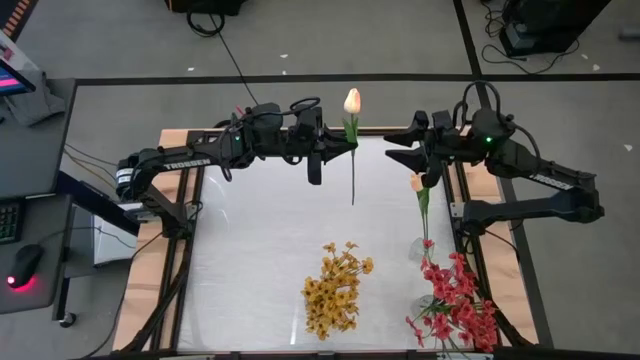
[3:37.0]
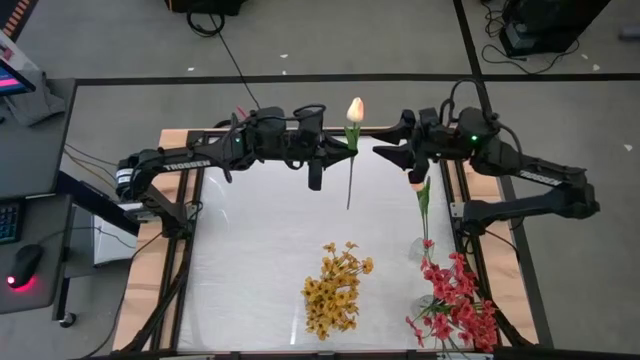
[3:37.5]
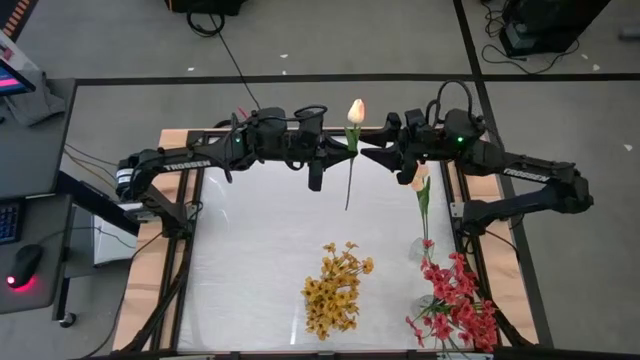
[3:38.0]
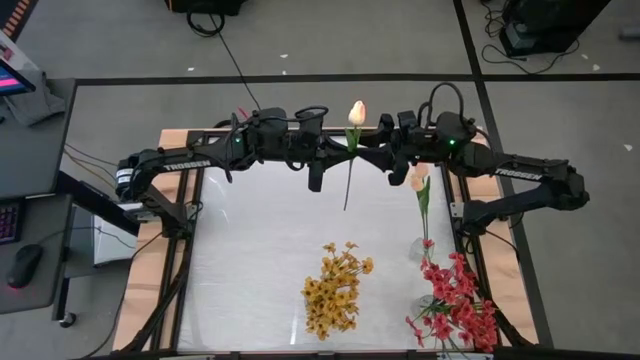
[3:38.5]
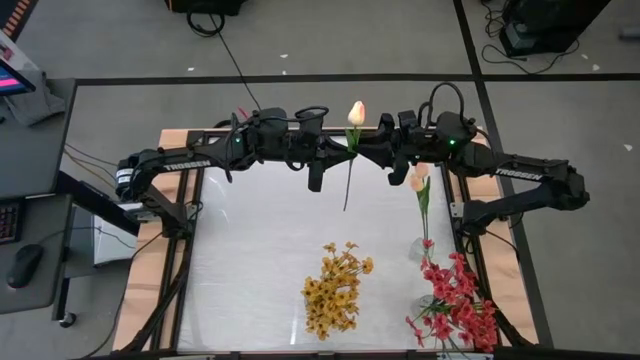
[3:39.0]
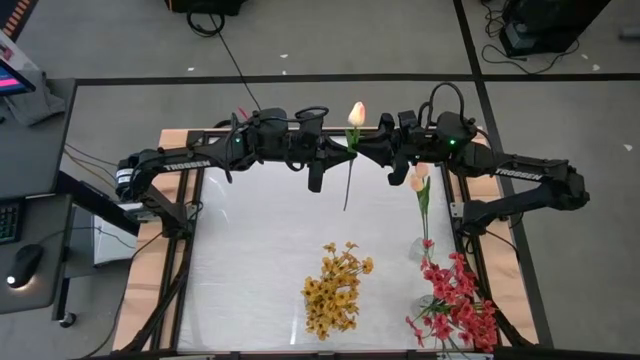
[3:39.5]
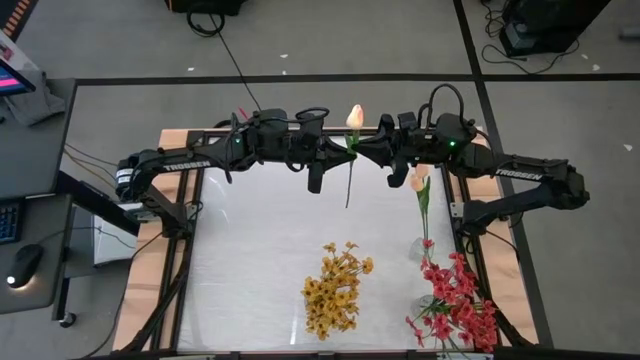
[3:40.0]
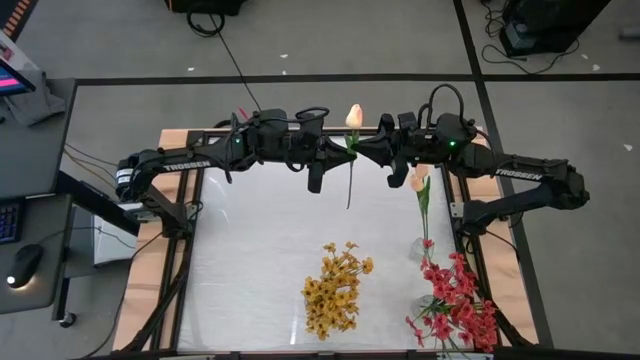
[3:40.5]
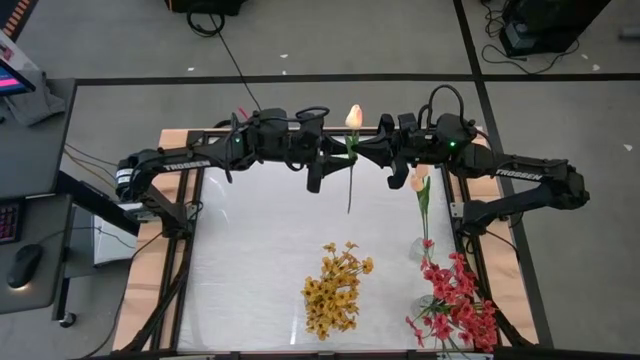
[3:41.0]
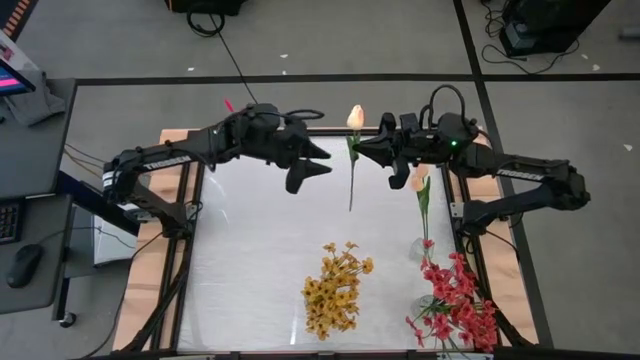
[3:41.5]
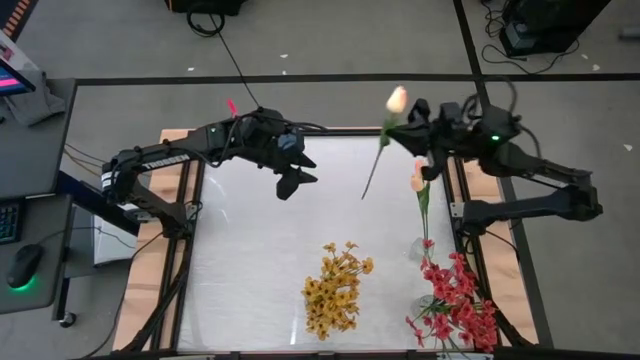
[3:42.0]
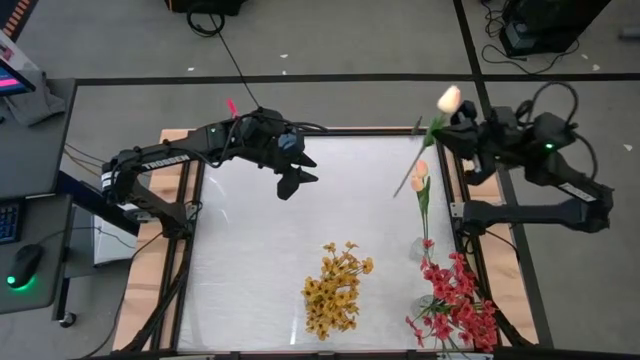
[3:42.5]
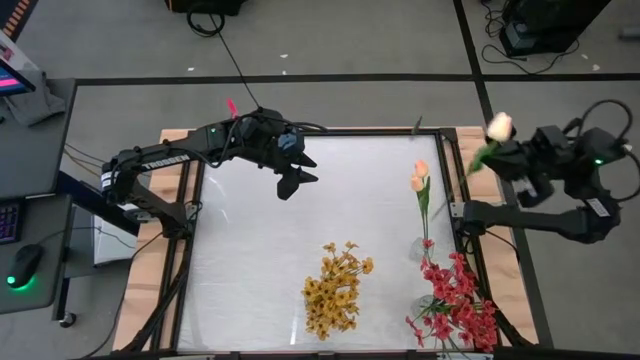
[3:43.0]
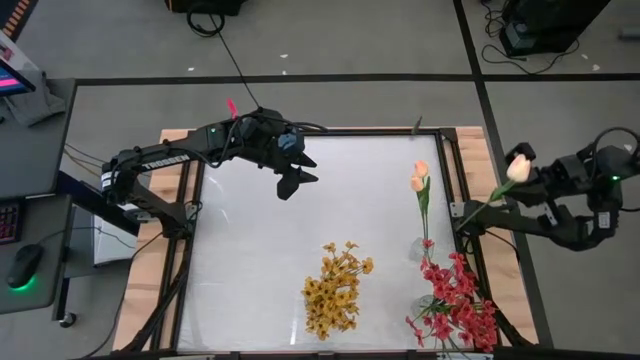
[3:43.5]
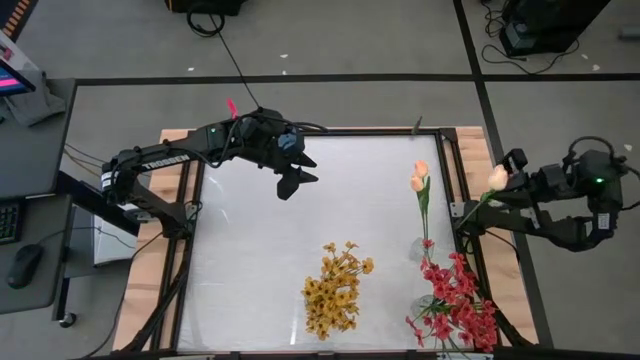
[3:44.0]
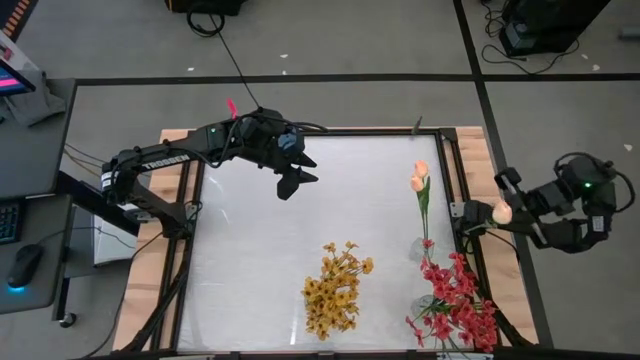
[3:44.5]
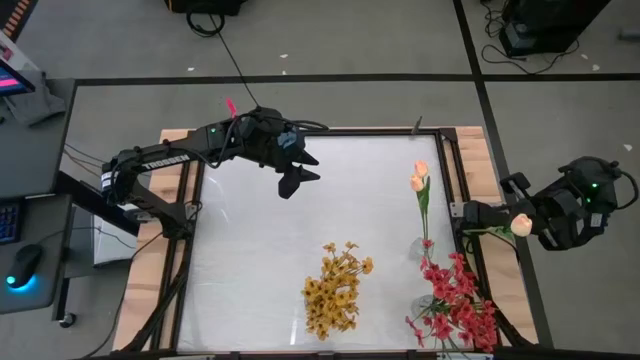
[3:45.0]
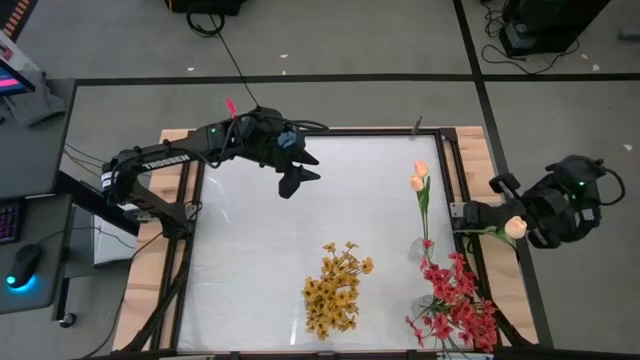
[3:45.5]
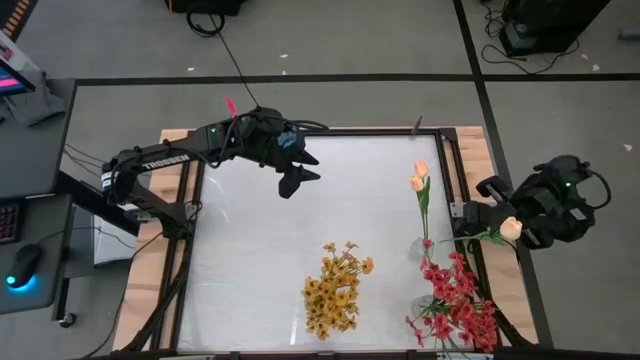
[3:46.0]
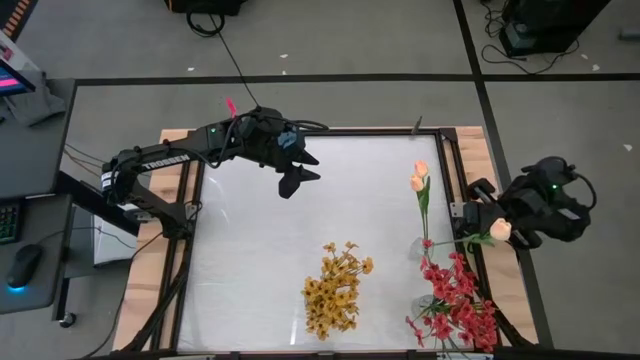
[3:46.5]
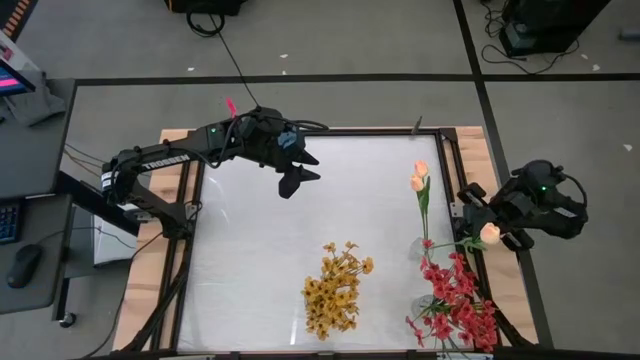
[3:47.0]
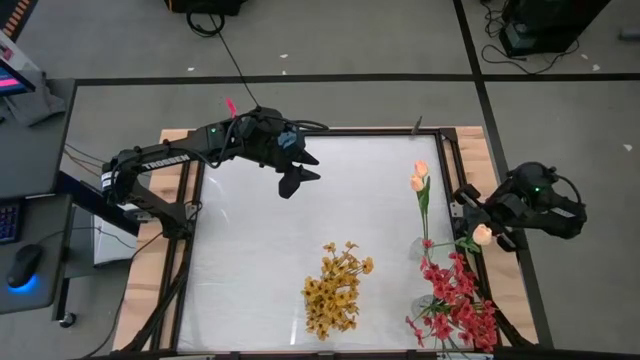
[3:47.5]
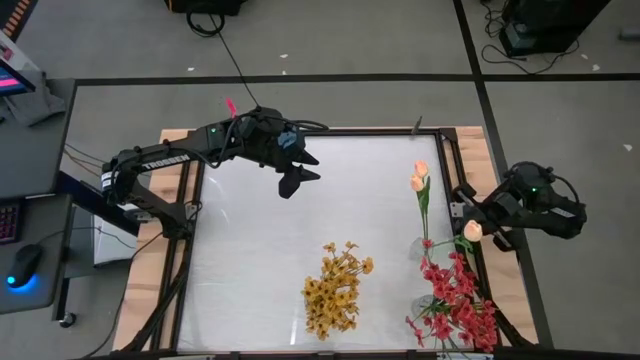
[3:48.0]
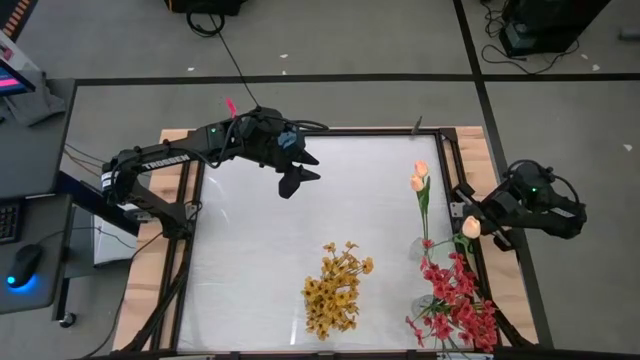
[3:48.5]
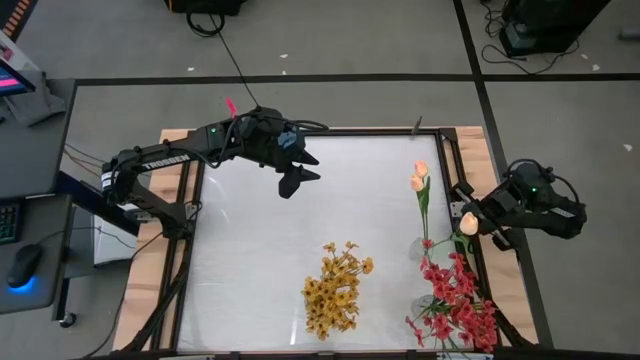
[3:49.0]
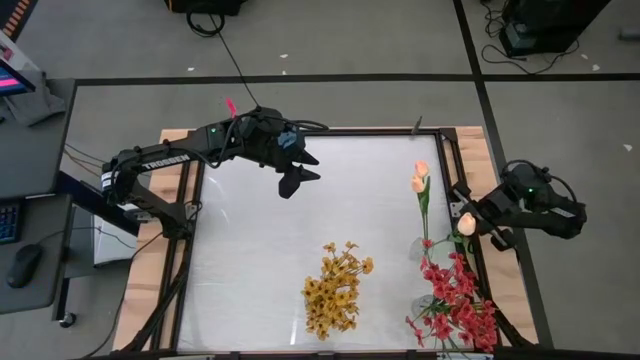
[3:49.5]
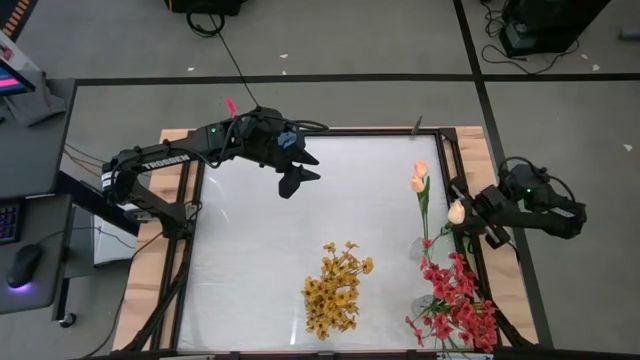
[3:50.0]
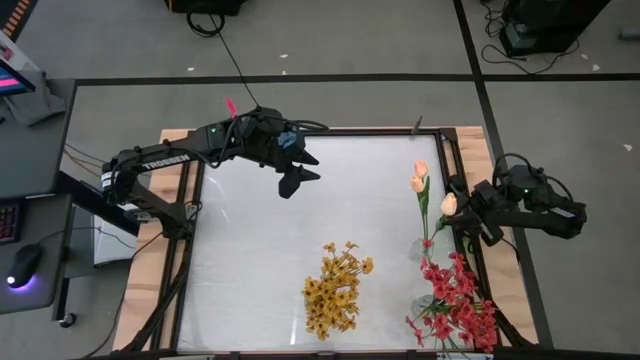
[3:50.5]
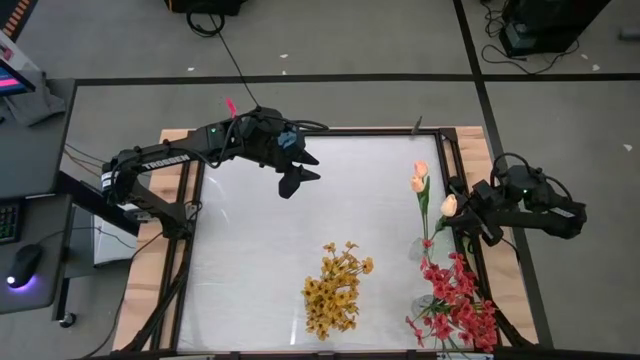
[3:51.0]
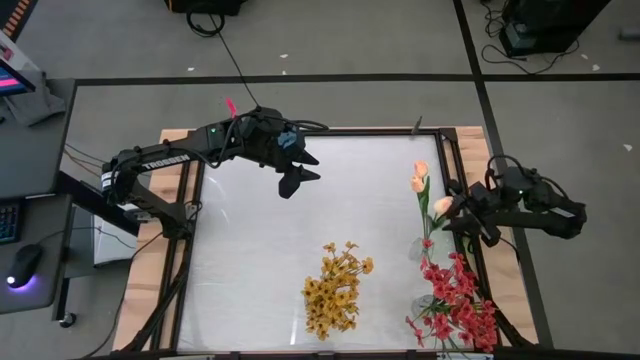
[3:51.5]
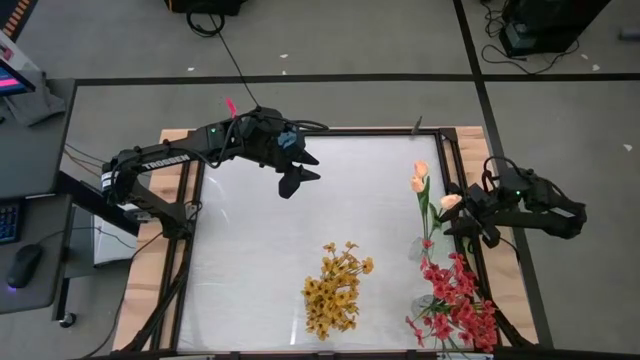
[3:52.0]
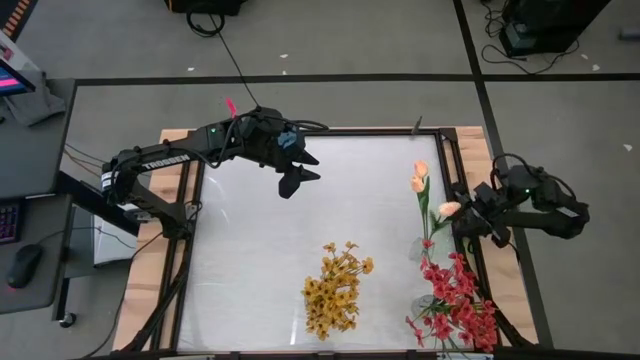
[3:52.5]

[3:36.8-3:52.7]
Task: Sort flowers into vase by color
Put the light pink flower into the top transparent vase

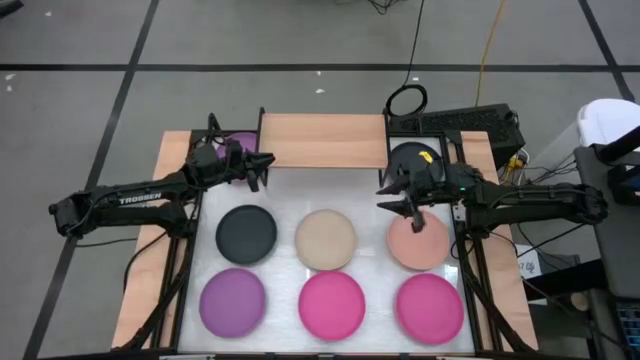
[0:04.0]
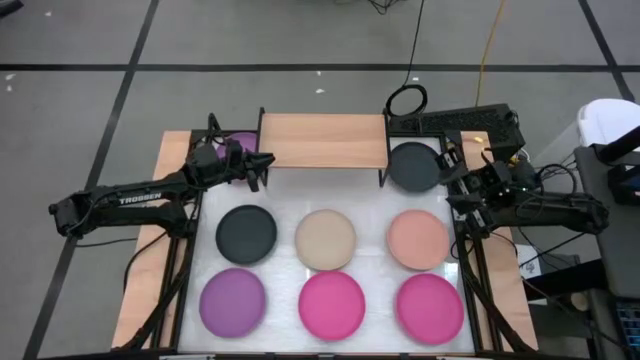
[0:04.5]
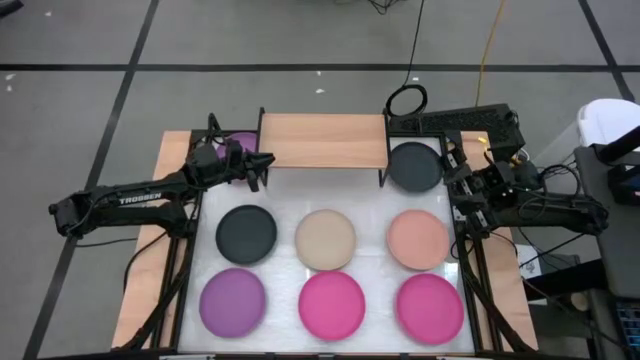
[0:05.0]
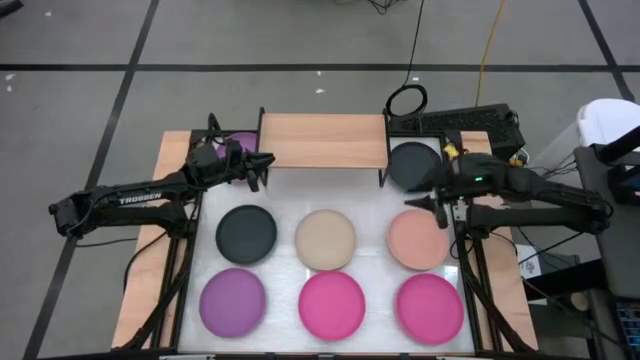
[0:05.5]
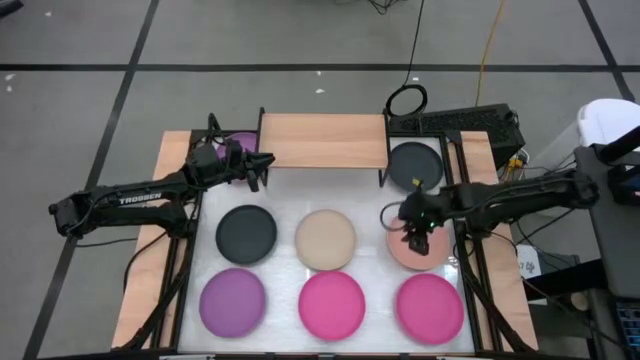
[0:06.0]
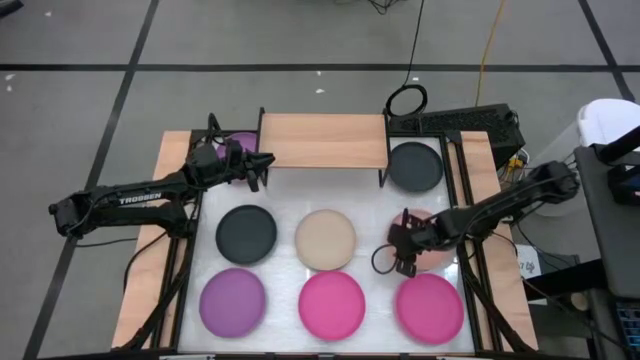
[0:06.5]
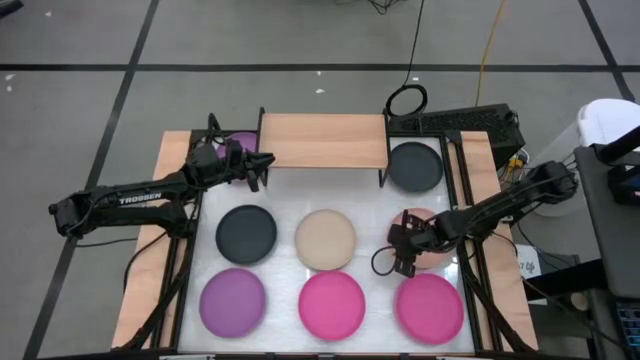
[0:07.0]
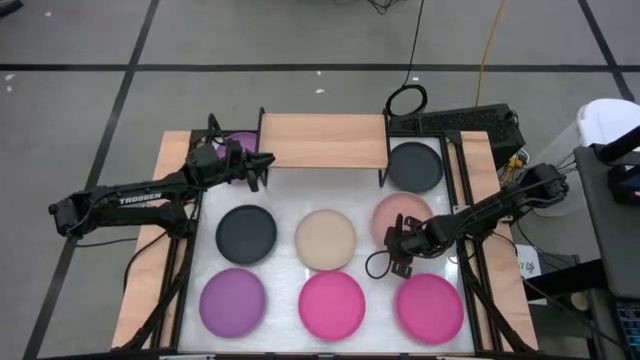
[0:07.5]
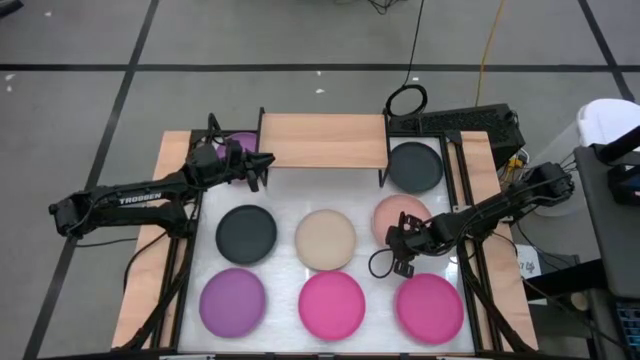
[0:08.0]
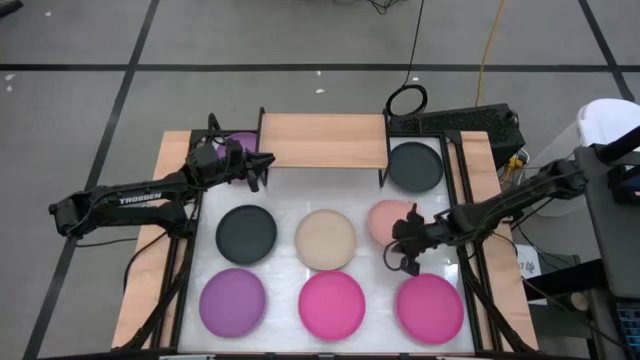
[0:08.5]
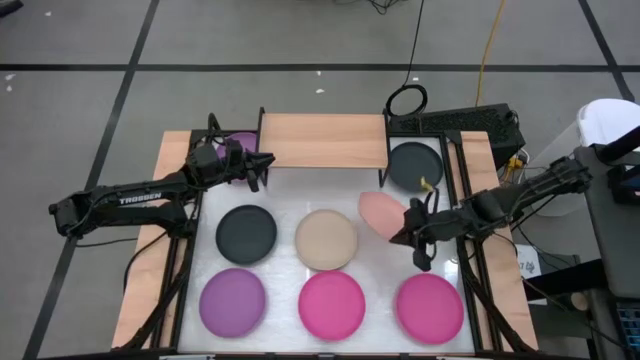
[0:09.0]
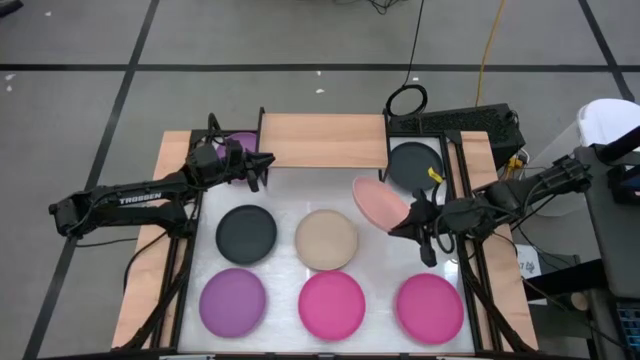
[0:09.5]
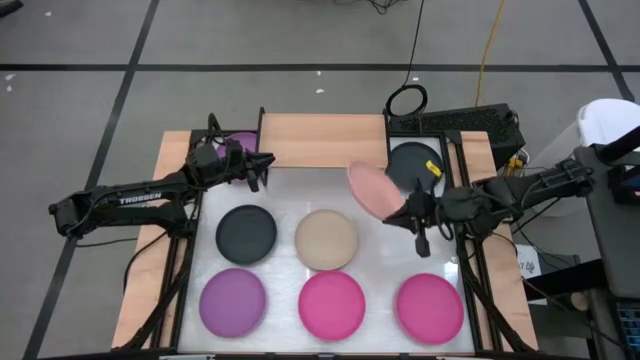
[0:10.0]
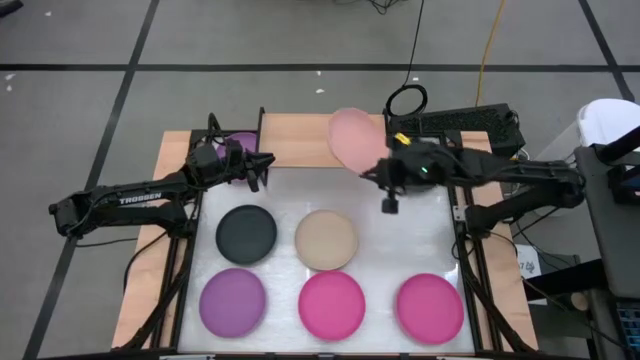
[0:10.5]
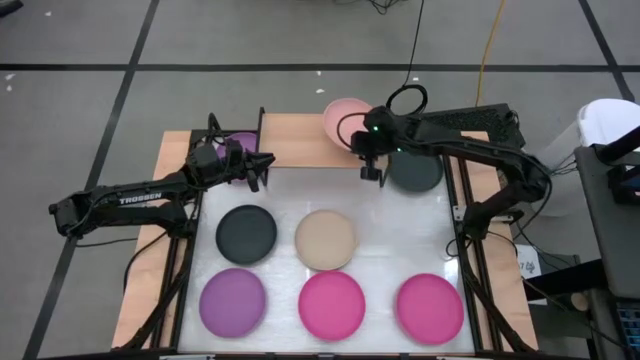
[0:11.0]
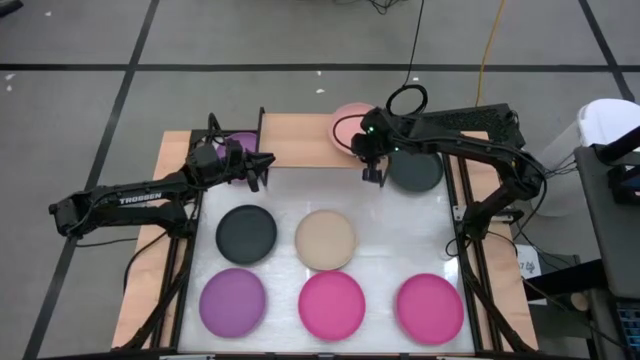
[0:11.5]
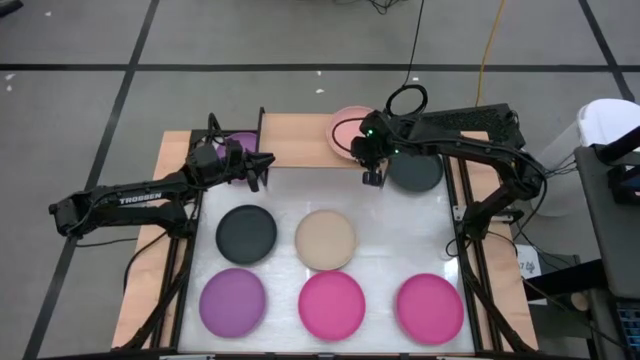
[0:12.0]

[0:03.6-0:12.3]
Task: Place and stack plates onto a shelf
Put the light orange plate on the shelf
